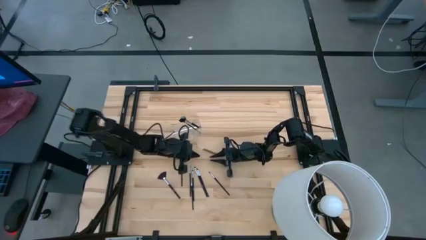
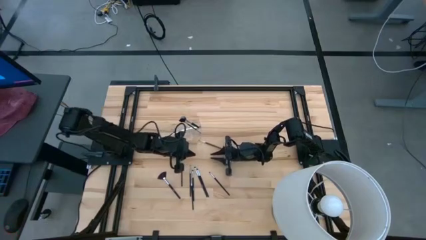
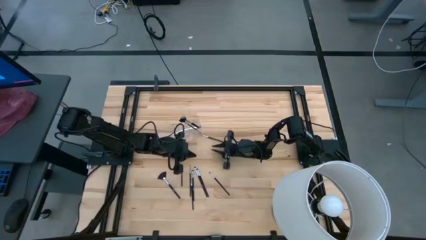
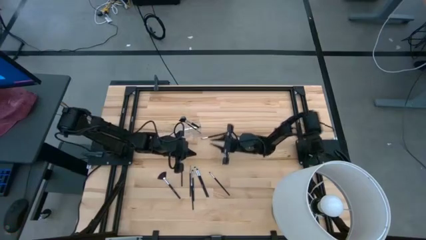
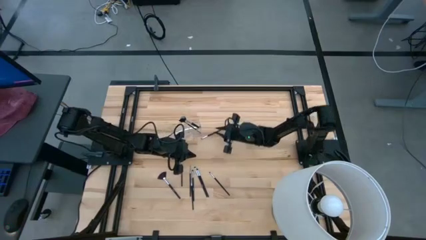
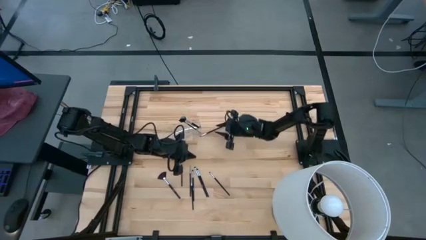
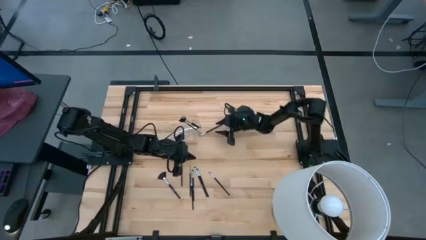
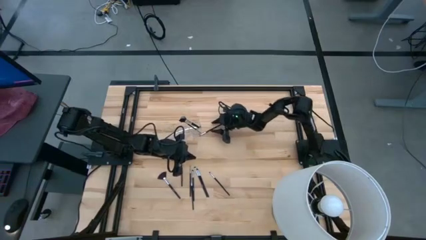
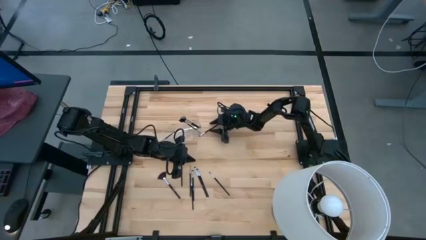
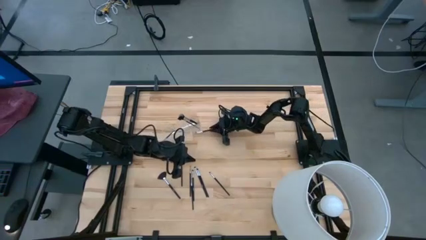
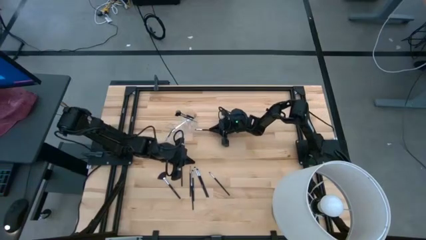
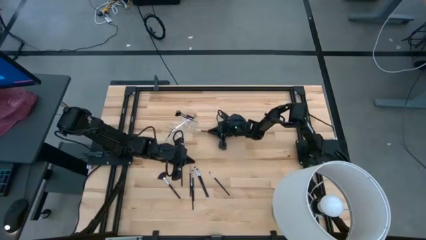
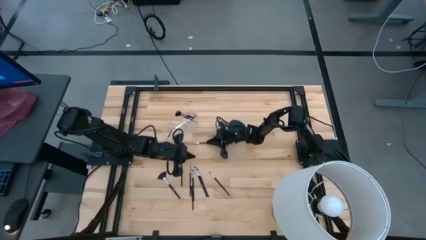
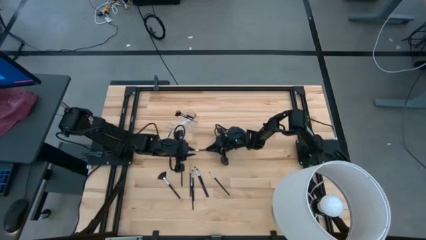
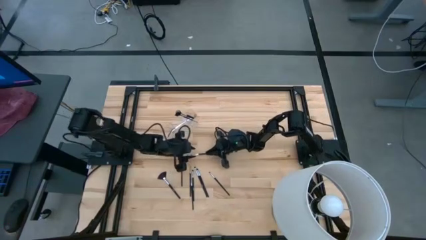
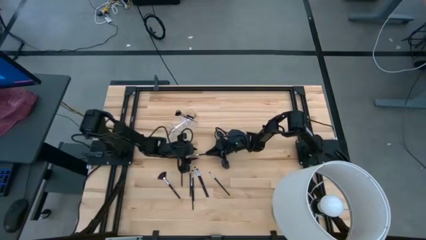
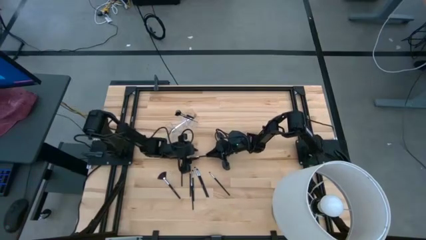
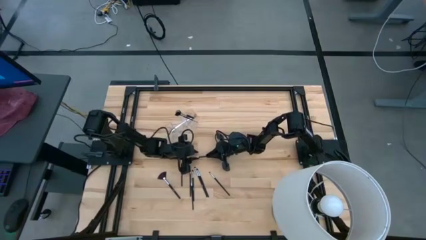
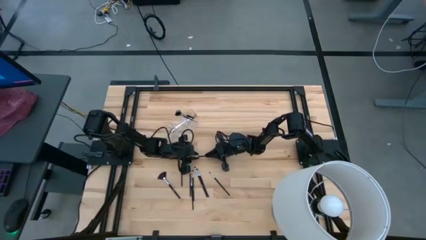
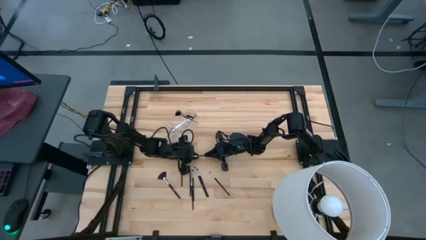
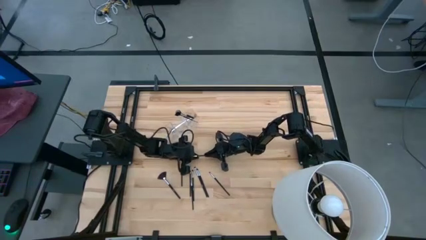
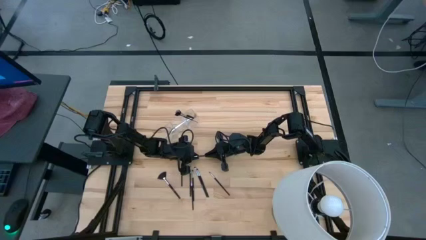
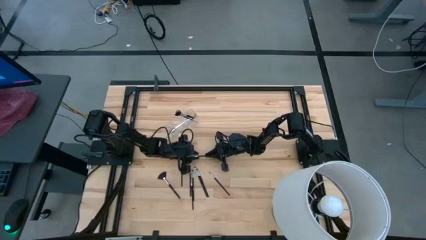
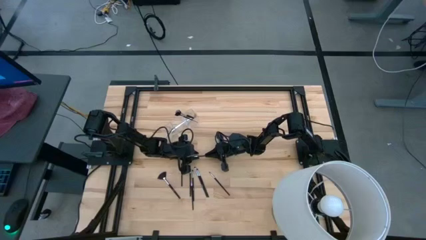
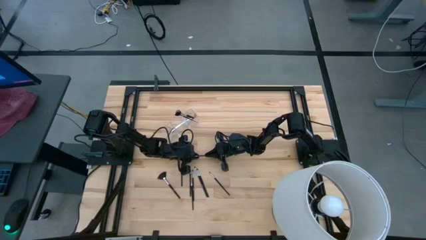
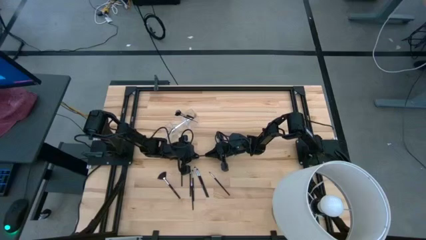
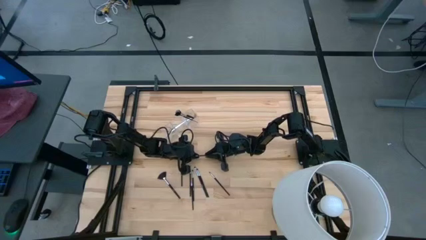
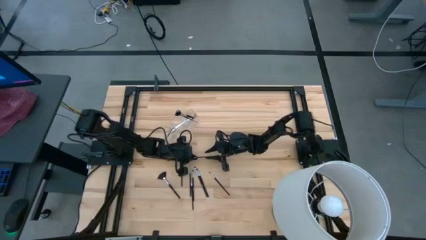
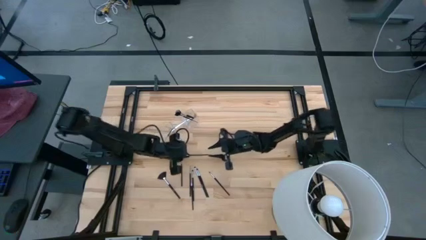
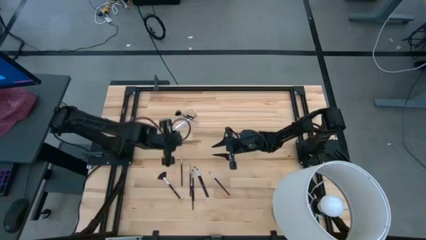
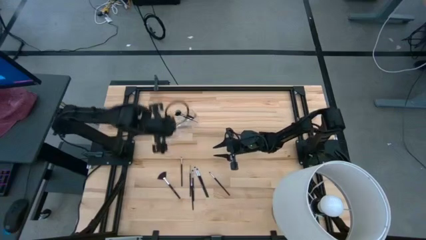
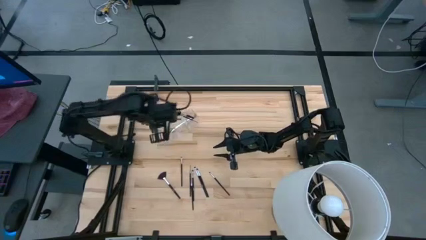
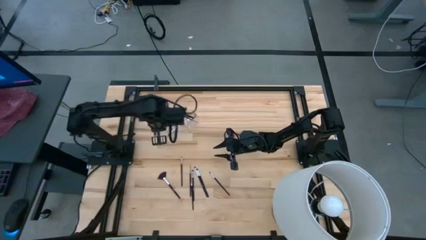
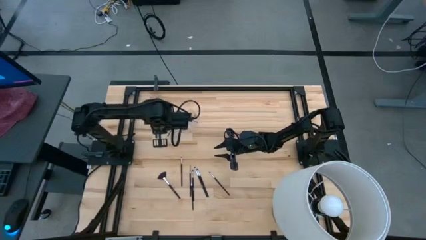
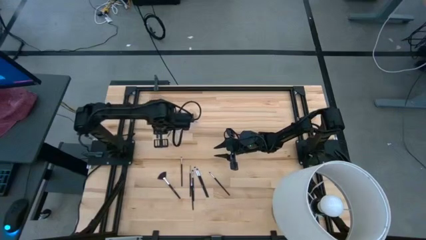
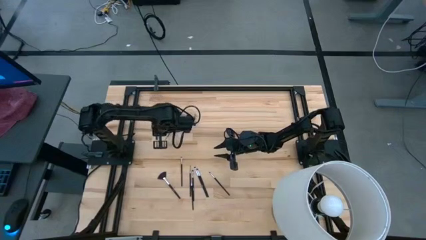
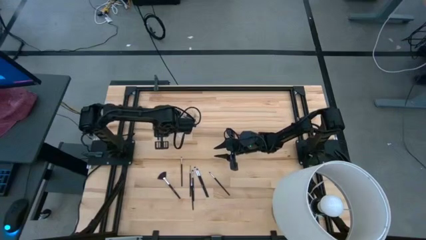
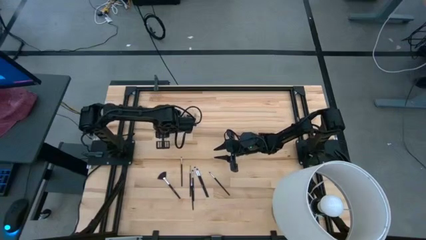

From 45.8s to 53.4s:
Task: Put items in baskets/containers
Put the eyeshadow brush into the left section of the transparent organizer

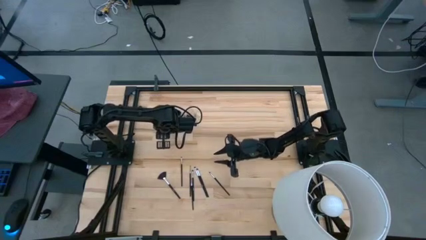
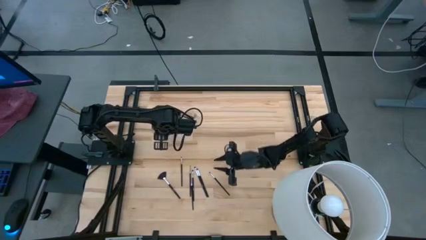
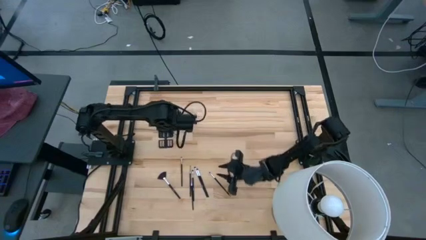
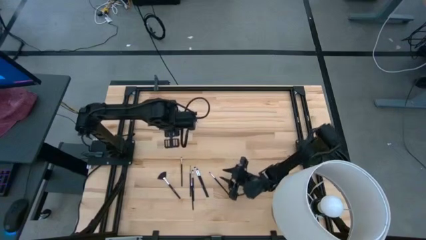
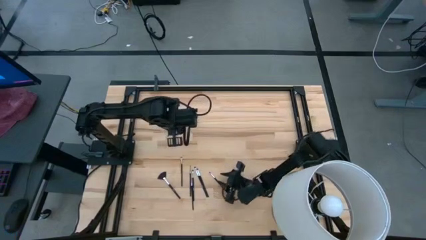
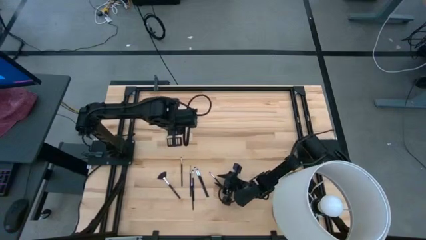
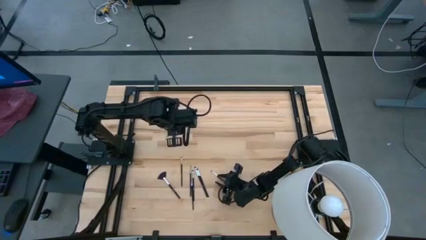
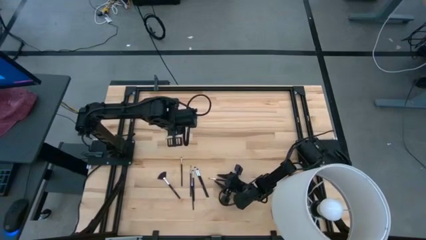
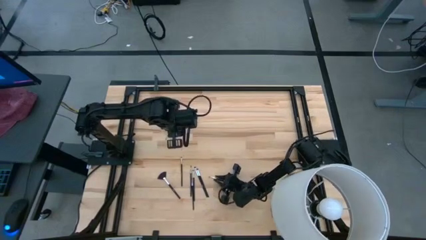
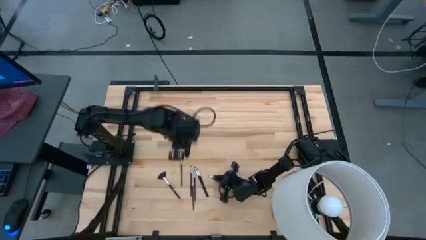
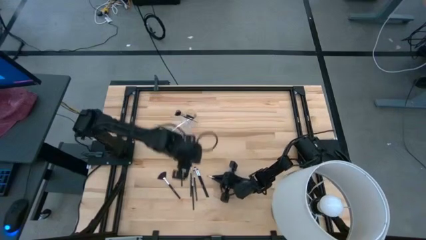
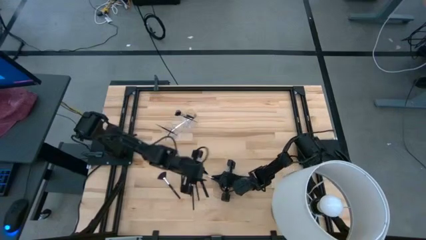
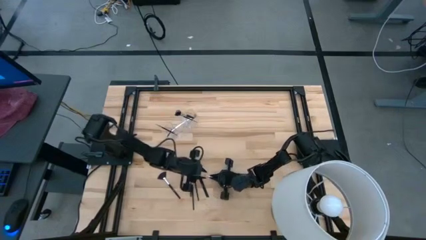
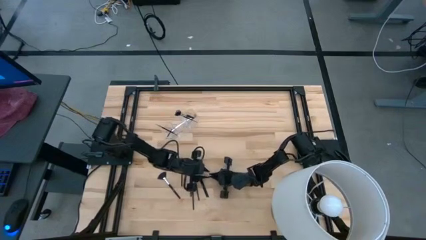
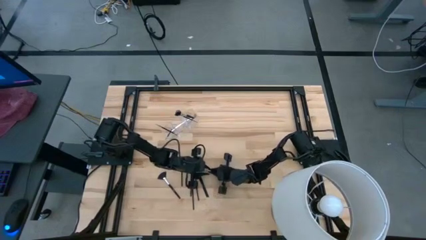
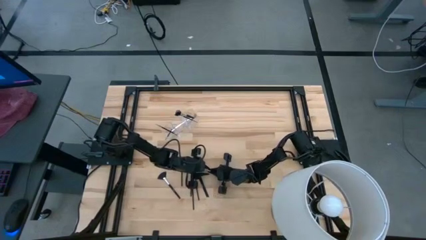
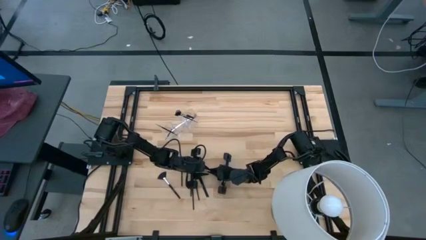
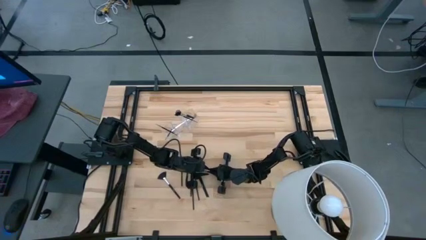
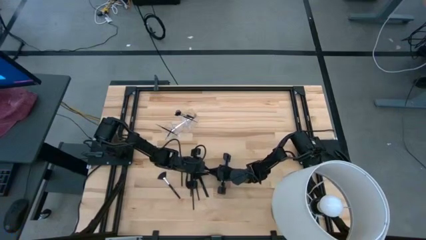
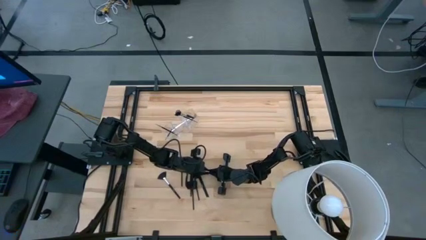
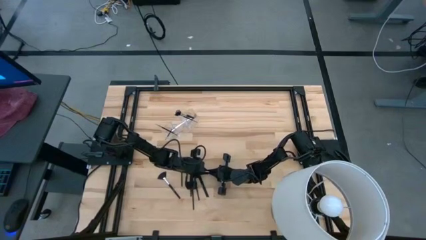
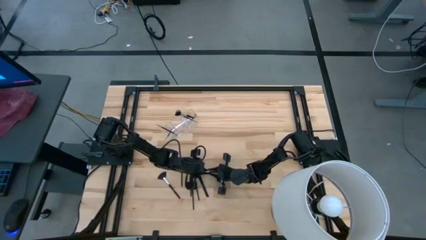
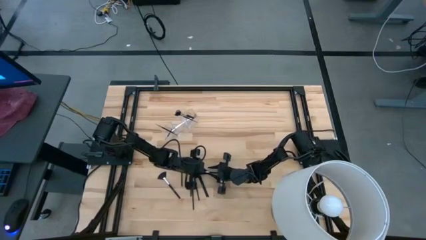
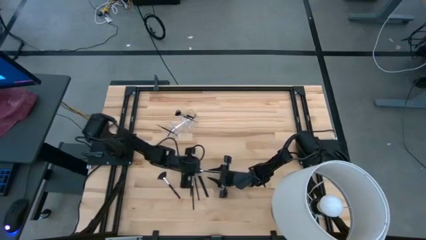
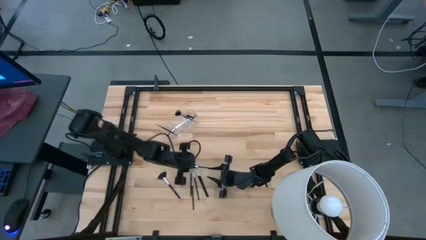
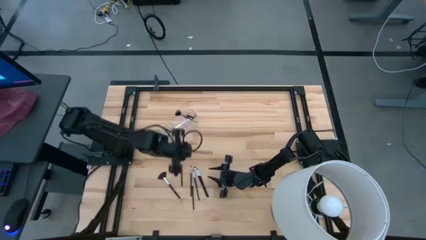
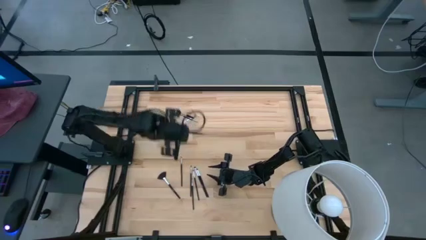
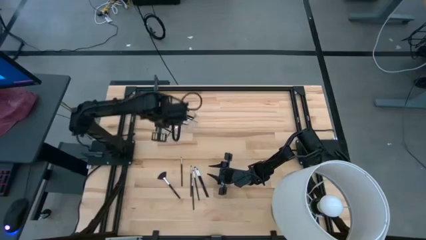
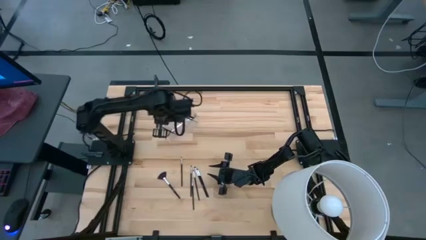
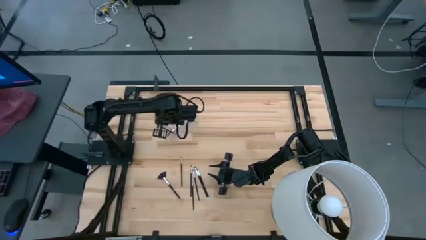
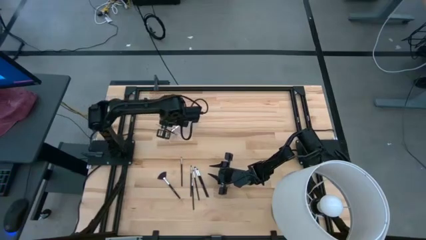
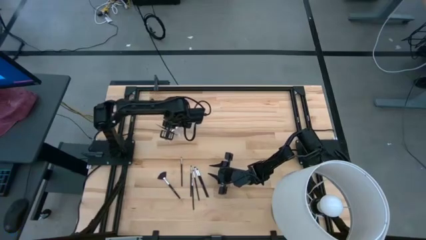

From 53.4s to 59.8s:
Put the eyeshadow brush into the middle section of the transparent organizer

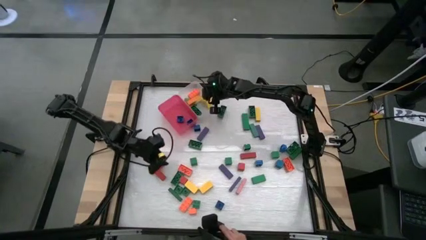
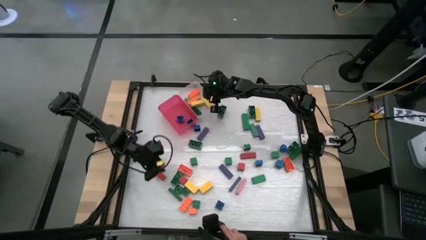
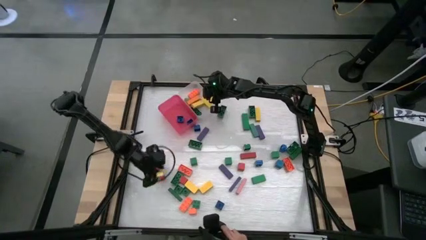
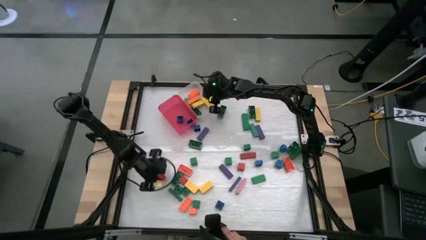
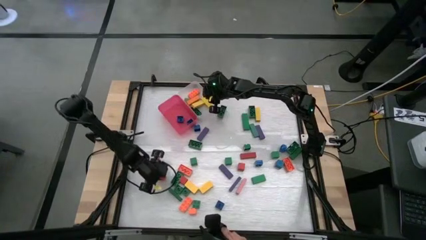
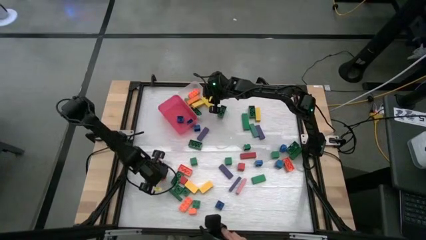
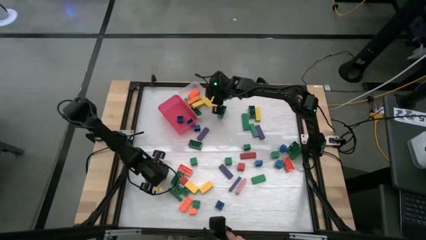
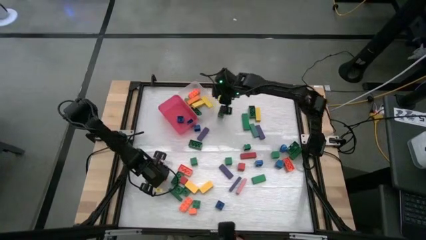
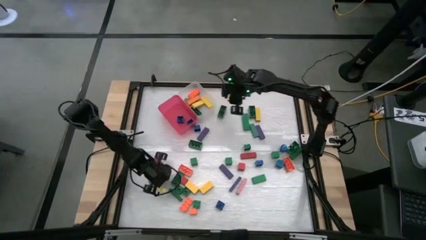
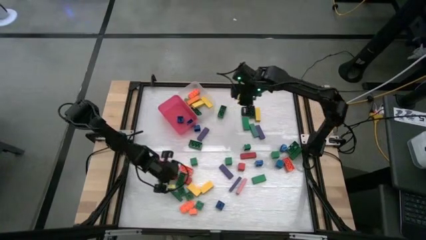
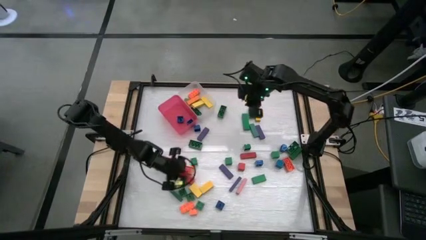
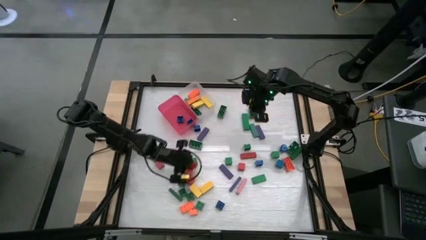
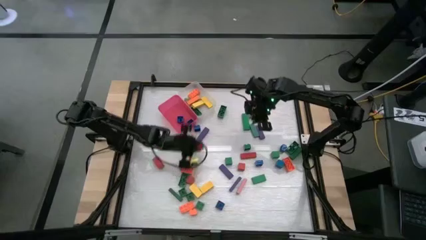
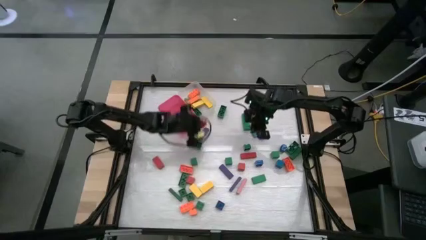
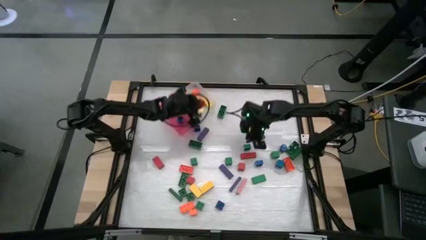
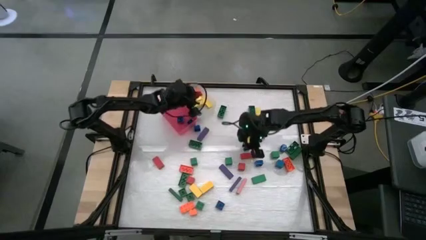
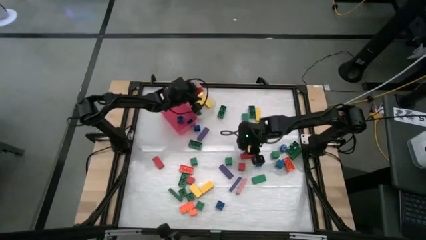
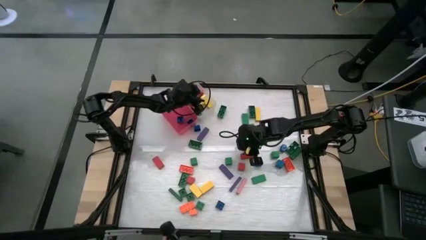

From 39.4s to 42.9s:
Task: Sort blocks by size
Put the big red block into the white bin
